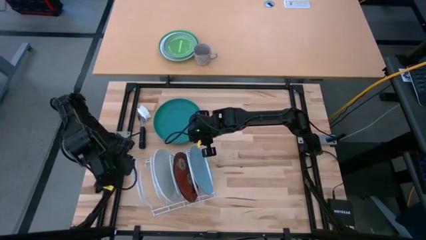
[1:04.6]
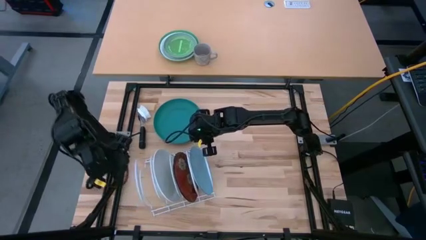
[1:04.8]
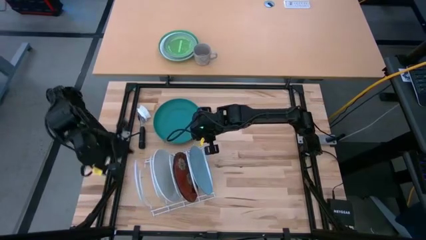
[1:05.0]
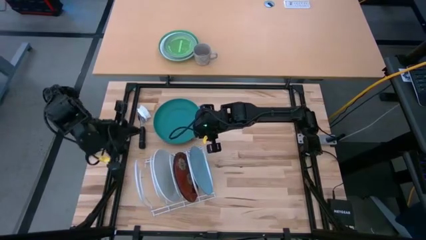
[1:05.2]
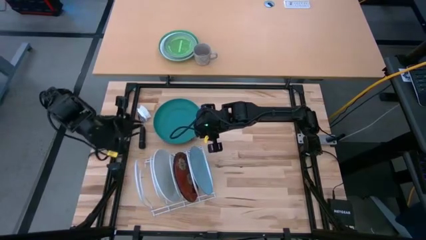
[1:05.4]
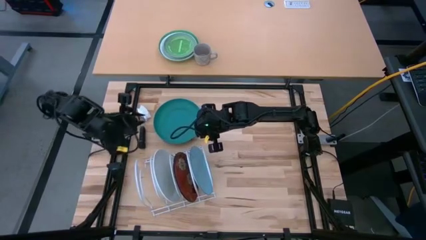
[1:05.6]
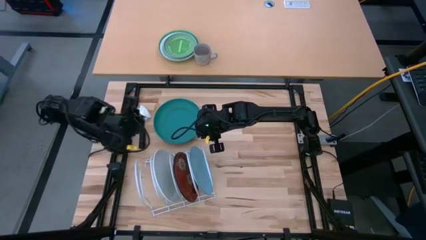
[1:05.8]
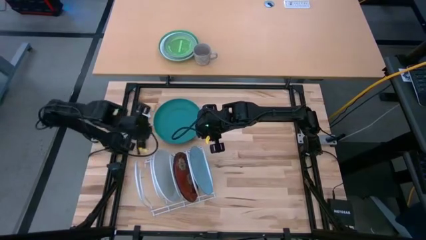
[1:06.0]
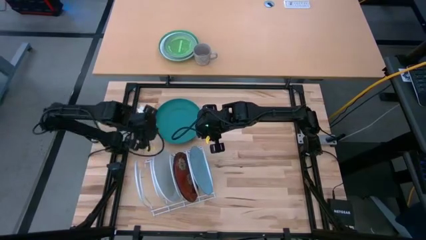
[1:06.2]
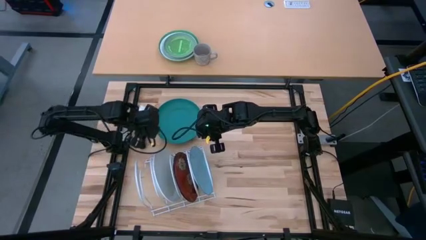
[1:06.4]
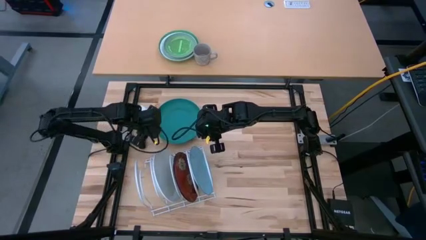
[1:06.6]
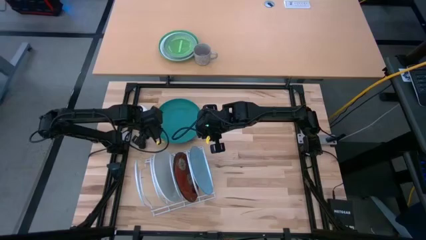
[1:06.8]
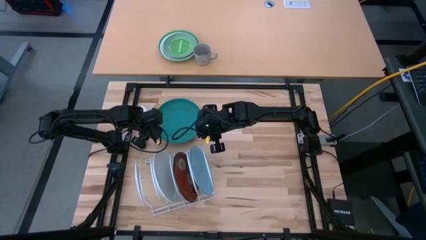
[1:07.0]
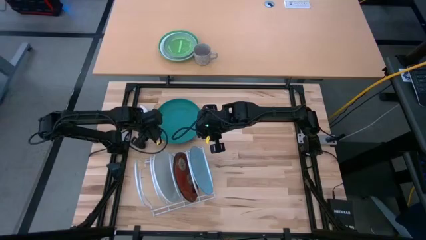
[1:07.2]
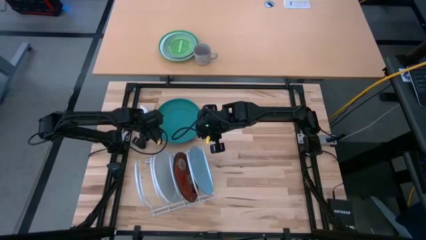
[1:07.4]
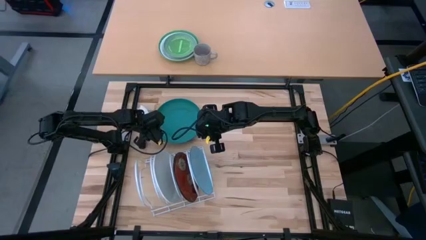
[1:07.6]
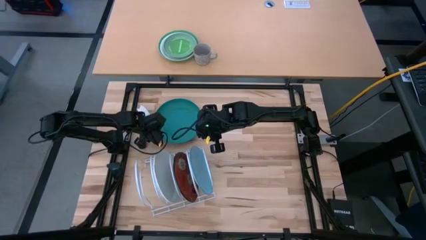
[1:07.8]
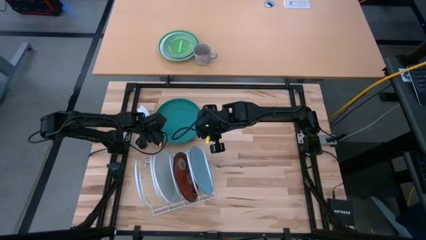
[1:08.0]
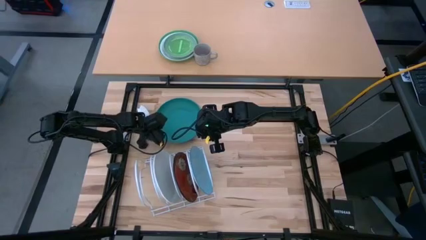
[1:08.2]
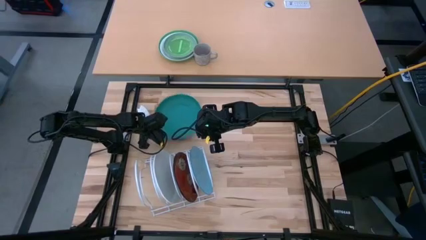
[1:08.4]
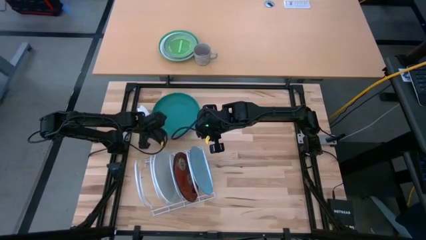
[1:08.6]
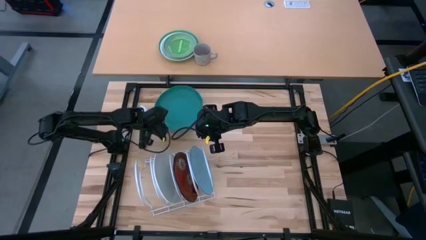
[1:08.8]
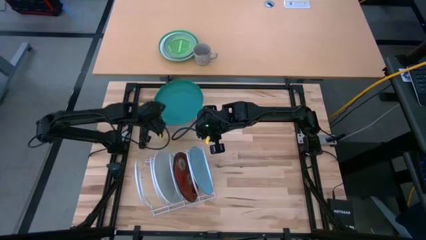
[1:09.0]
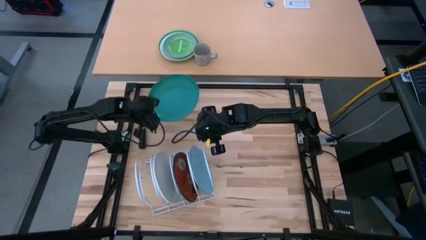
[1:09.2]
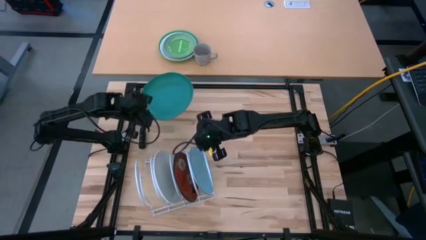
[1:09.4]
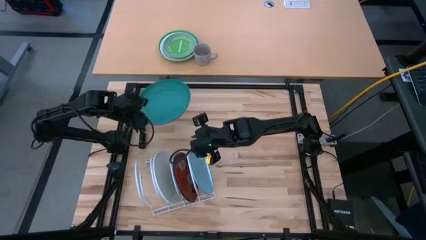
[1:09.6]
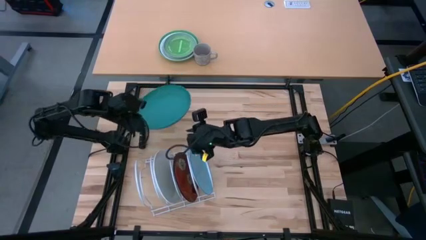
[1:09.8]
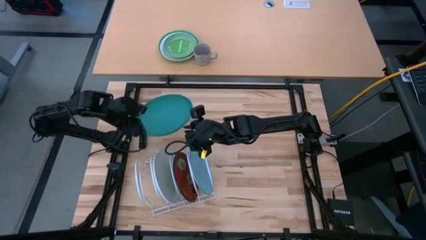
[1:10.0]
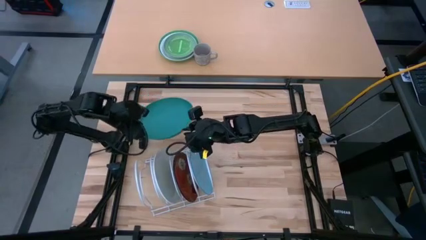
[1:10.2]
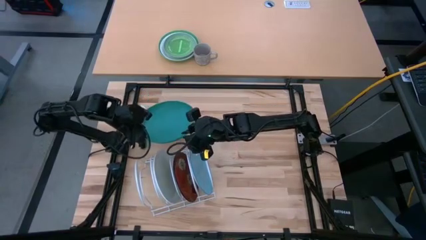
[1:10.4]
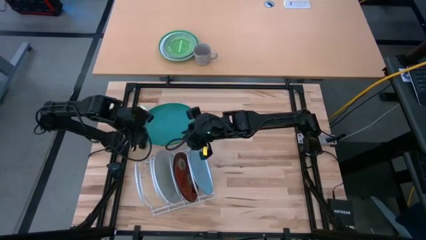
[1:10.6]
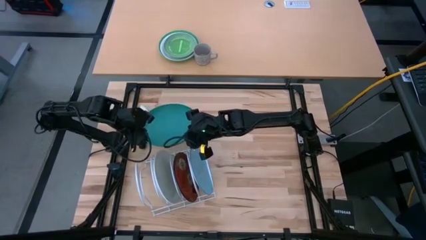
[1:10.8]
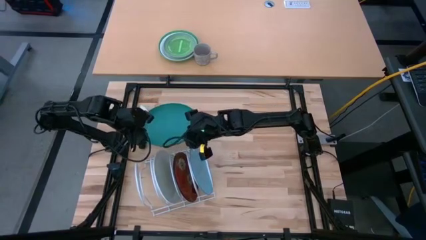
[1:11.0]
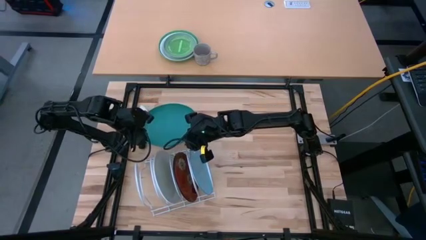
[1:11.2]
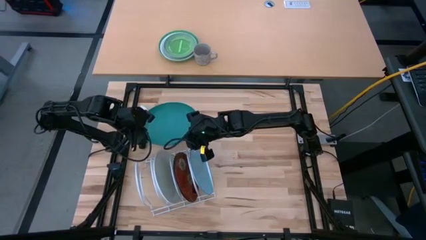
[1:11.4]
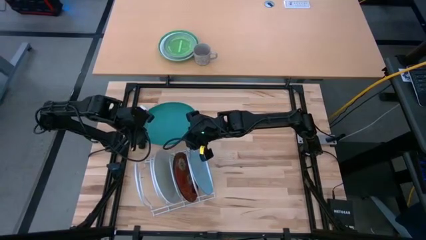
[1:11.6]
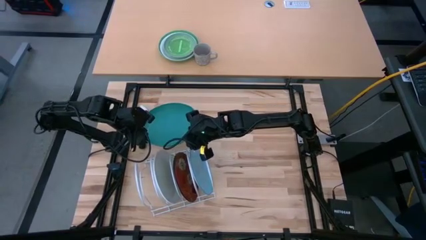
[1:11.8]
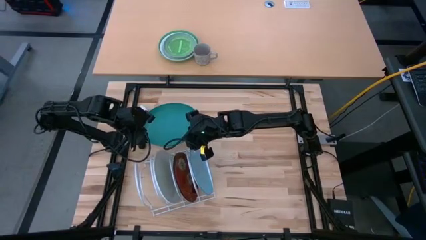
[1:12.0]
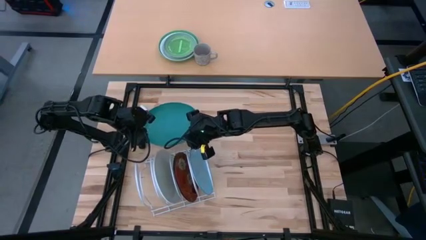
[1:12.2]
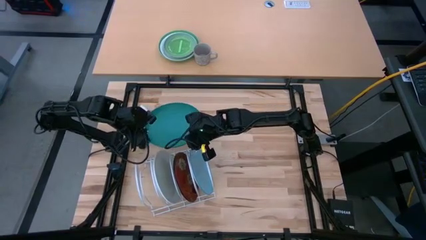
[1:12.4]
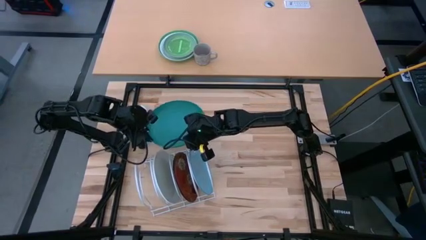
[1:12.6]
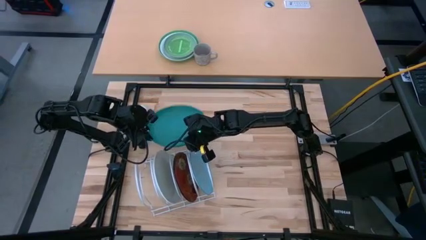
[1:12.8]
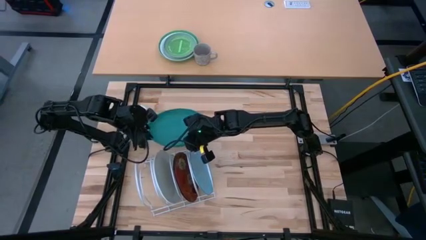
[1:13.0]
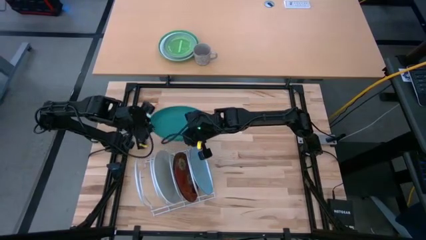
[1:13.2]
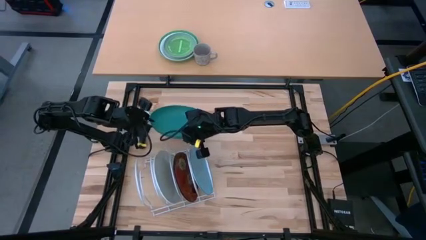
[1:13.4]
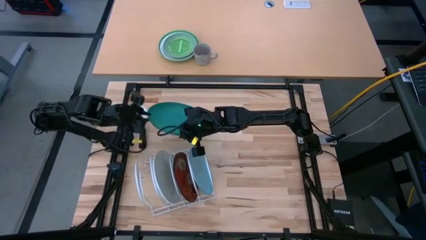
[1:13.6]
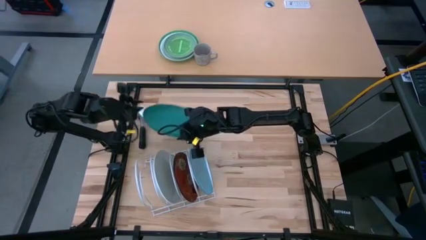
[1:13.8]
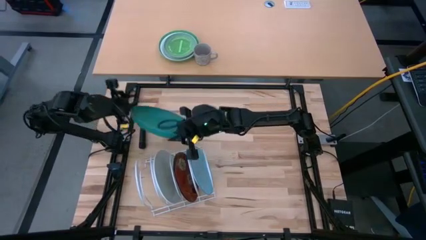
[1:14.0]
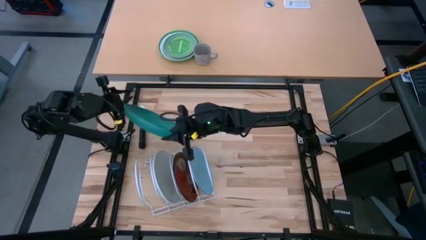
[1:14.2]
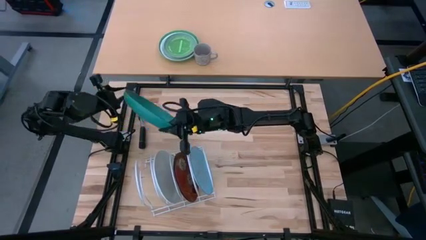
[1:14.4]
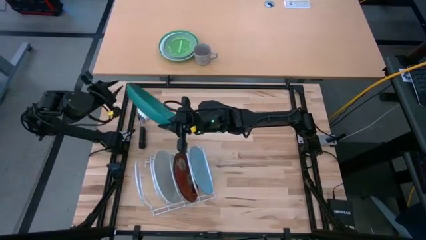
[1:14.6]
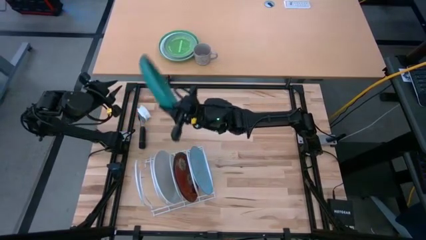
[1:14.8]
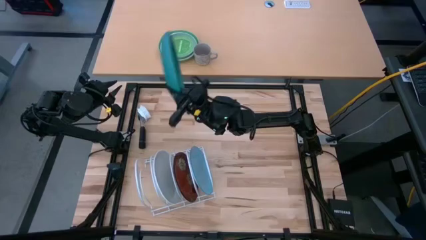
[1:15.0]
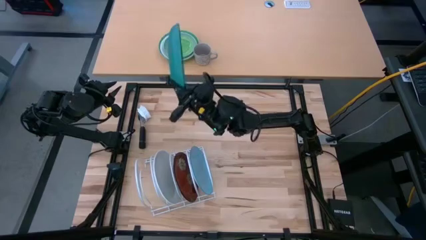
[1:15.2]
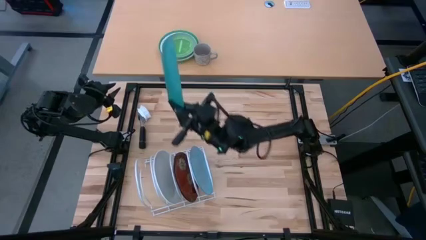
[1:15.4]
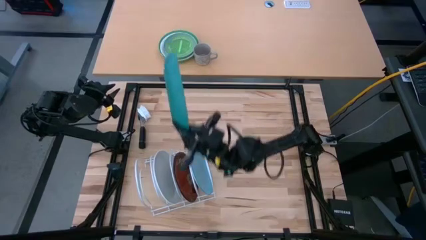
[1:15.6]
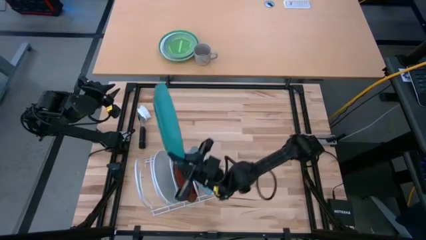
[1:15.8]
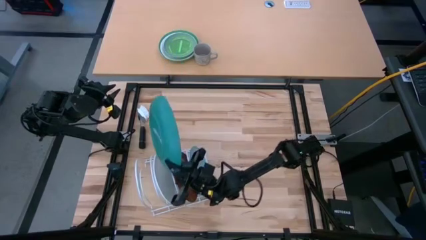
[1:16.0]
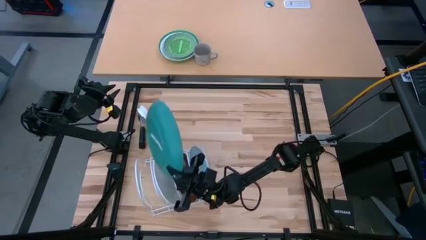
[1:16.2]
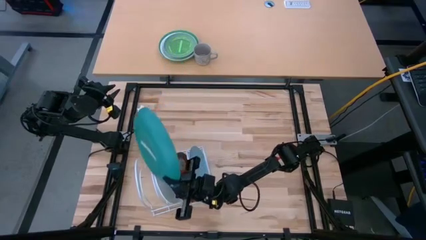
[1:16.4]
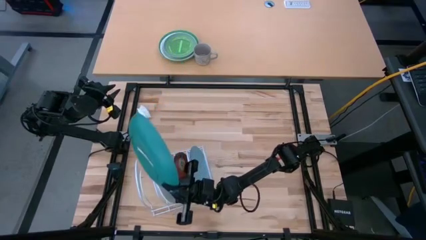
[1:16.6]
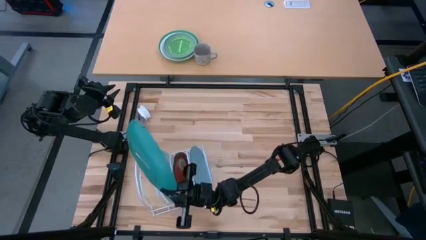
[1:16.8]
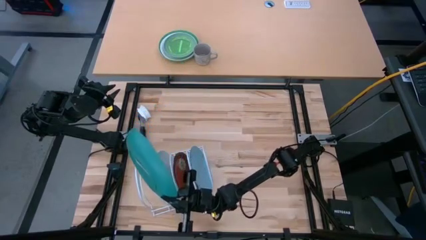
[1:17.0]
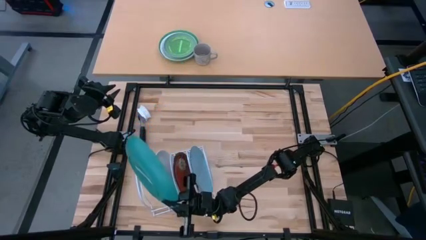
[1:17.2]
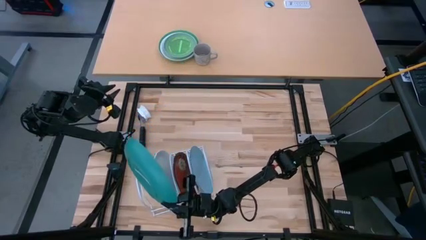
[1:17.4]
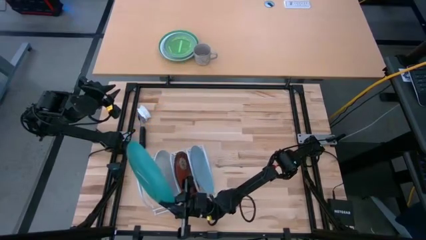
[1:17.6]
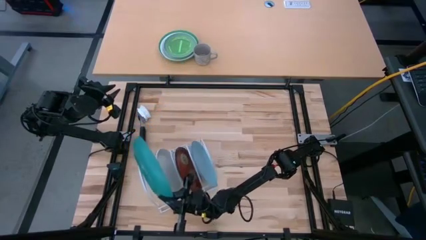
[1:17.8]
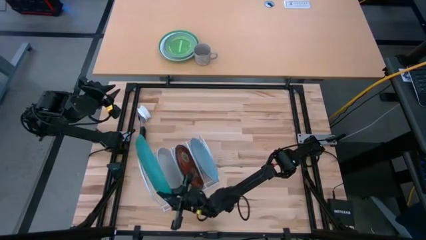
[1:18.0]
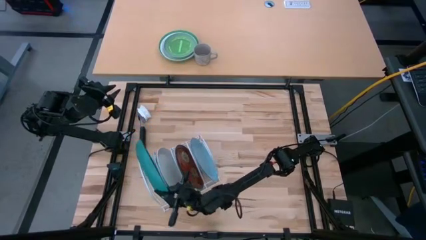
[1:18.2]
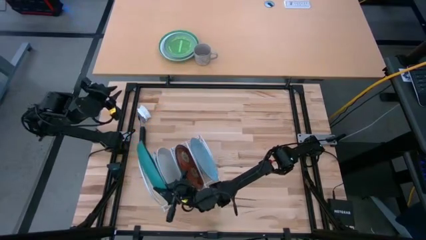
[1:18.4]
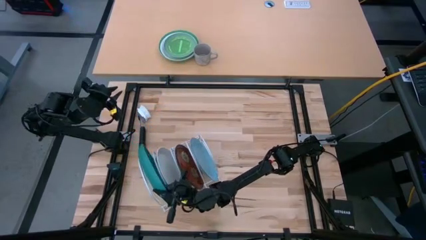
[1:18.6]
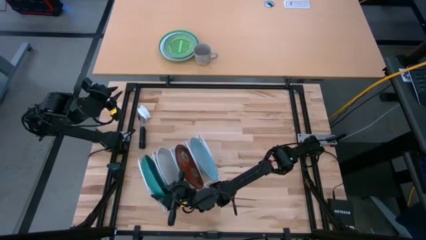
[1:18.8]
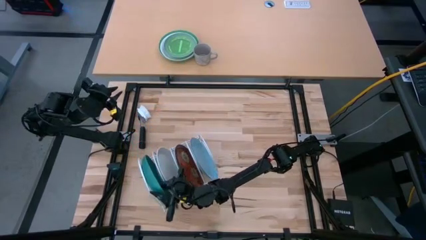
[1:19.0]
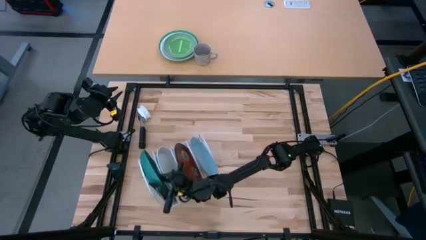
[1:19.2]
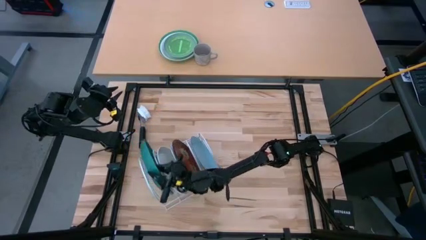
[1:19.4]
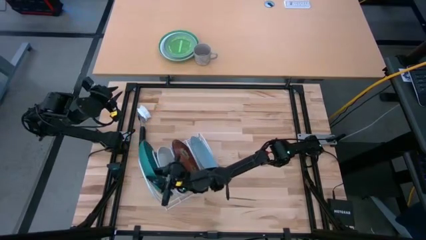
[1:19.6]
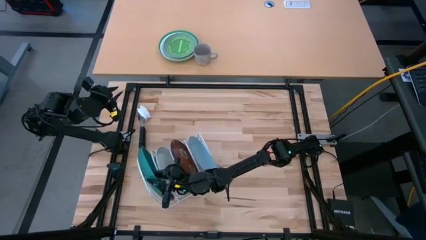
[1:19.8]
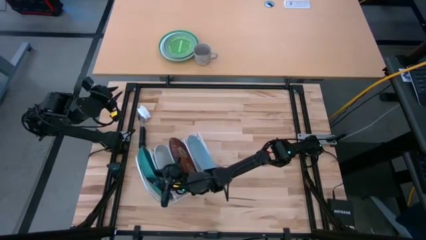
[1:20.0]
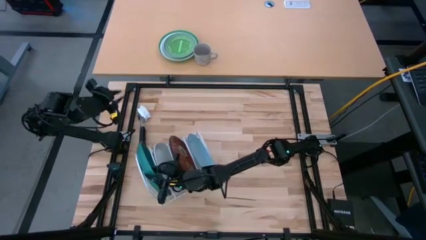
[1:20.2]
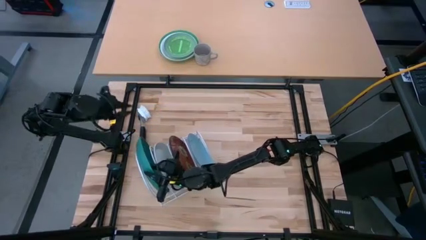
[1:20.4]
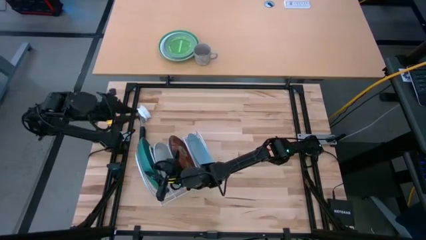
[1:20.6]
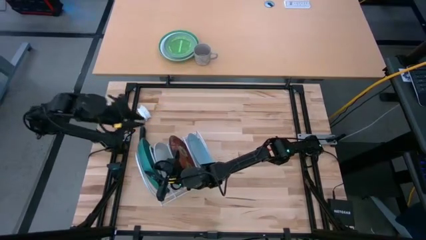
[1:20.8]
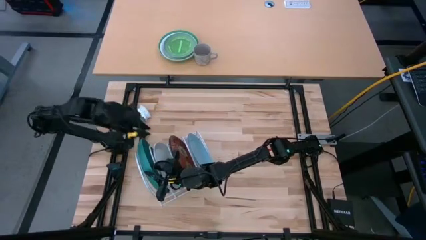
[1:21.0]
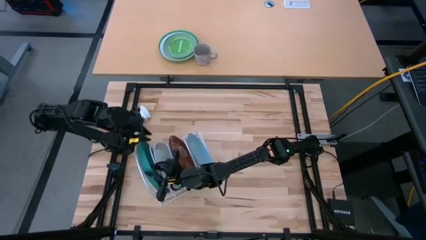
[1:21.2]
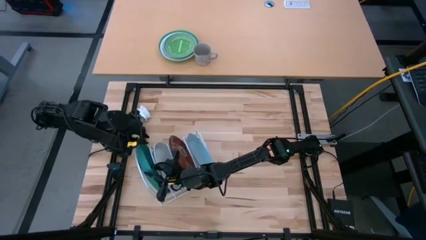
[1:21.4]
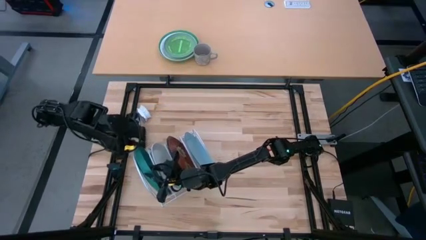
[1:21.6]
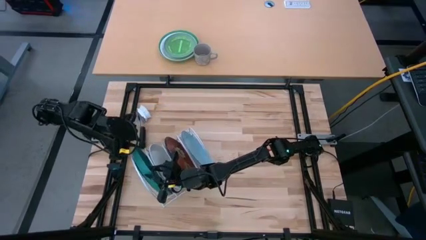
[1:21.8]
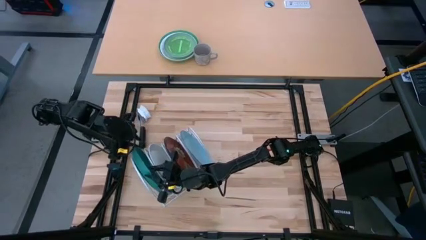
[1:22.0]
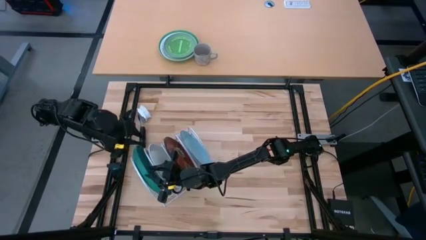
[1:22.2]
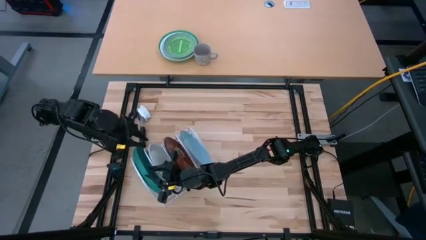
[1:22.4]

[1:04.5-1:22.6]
Task: Sort dishes
Put the dark green plate into the dish rack
